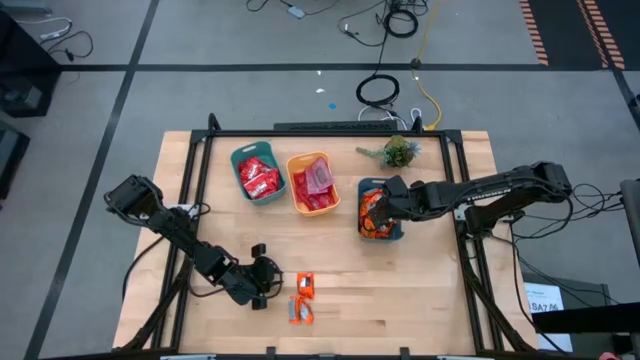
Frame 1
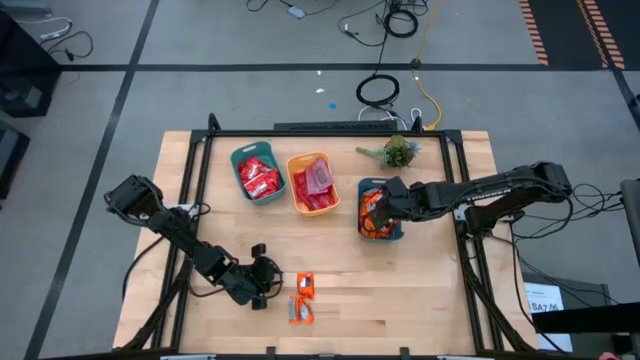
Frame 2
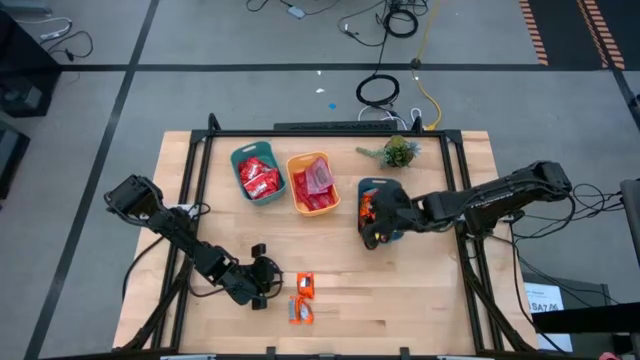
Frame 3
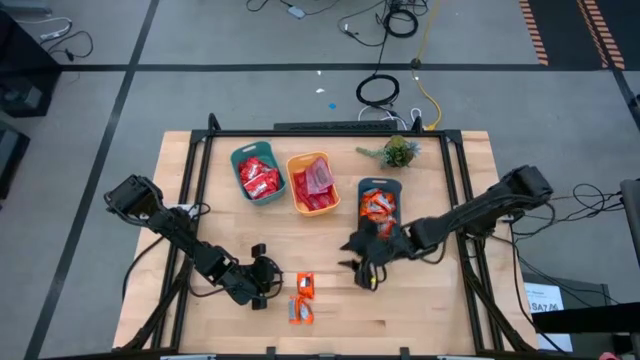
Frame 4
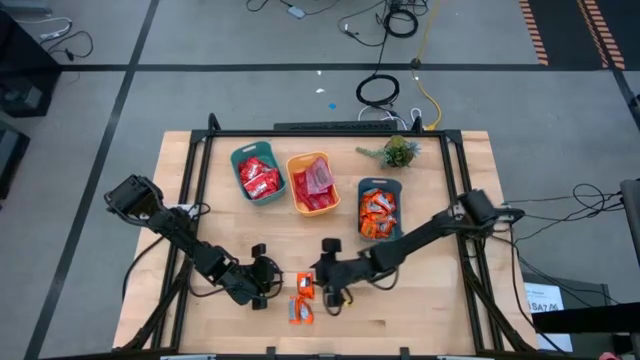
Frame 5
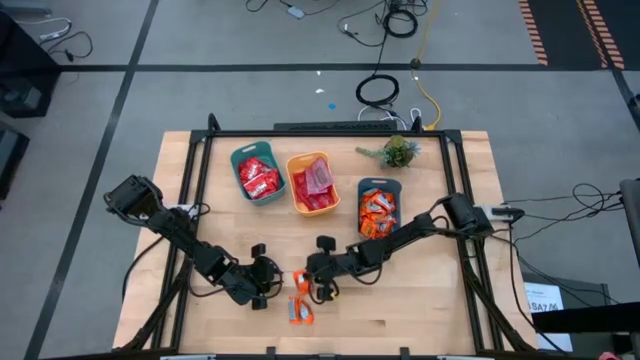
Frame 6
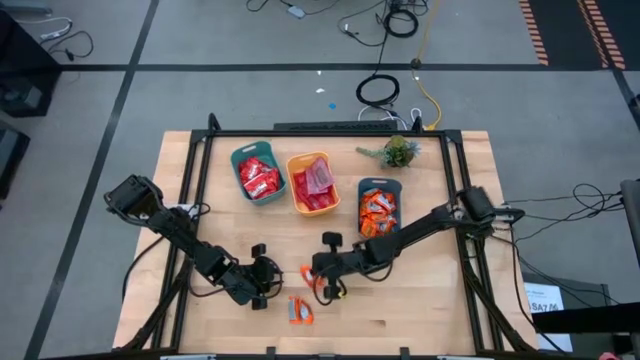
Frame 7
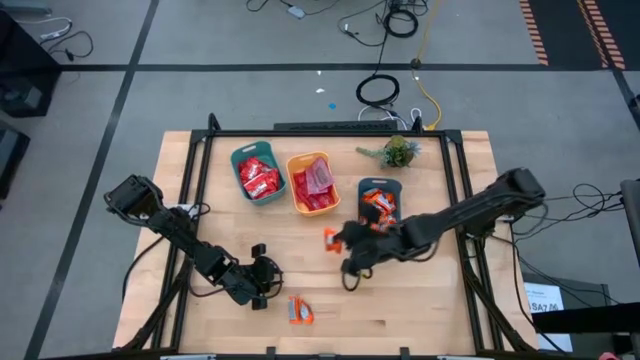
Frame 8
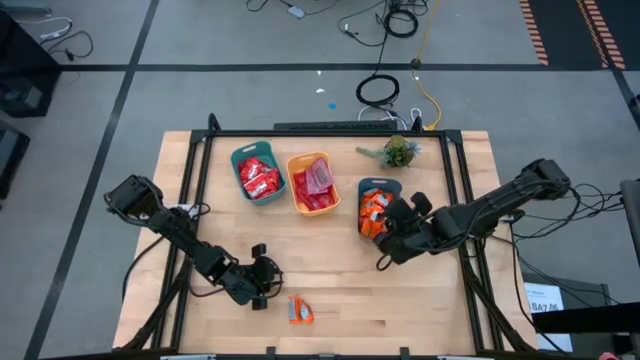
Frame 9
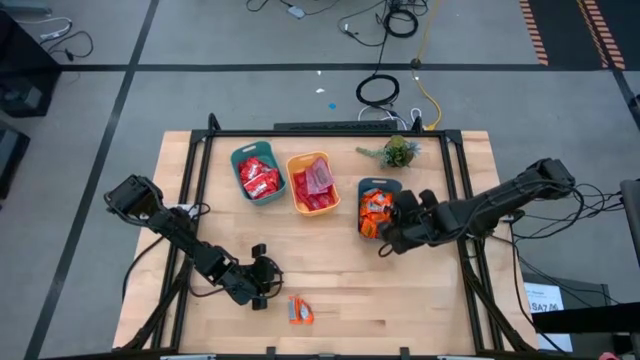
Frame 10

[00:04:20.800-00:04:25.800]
Task: Sort candy
Put the orange wrapper chocolate into the dark blue bin

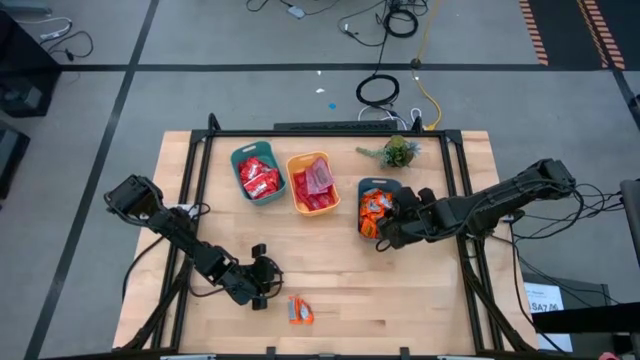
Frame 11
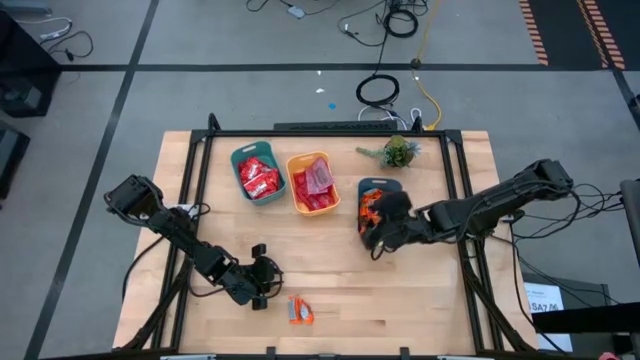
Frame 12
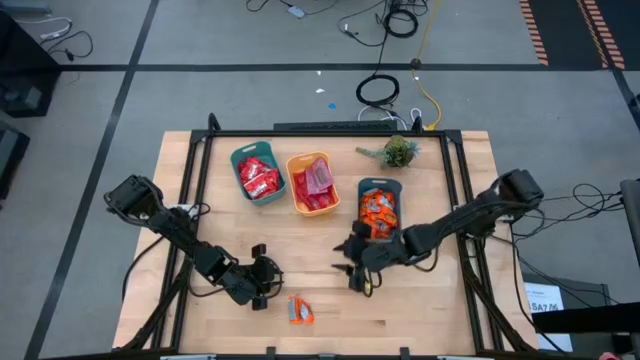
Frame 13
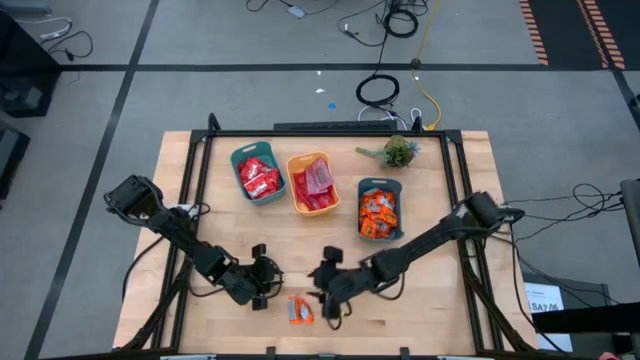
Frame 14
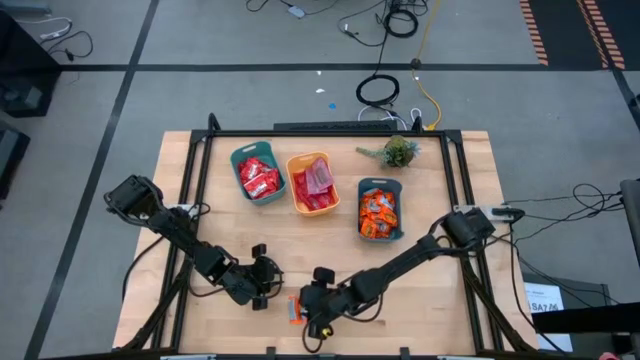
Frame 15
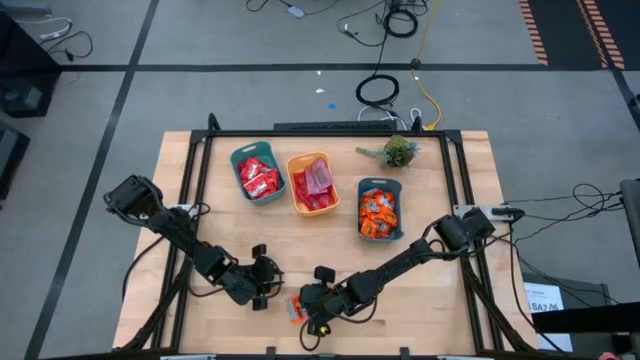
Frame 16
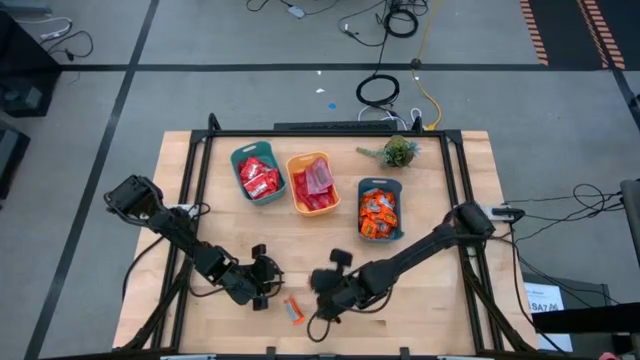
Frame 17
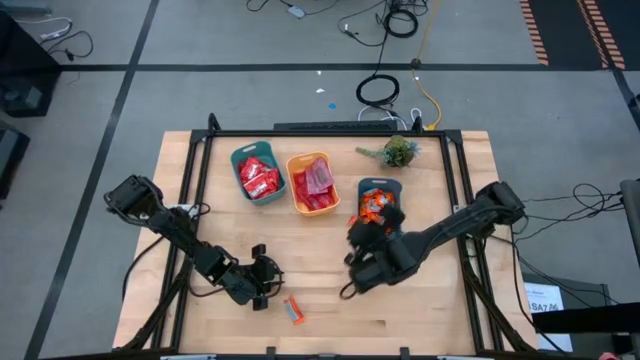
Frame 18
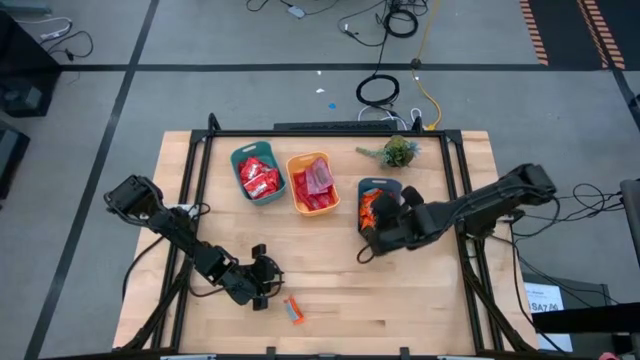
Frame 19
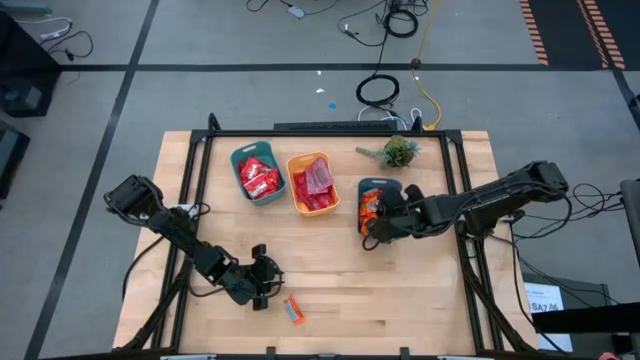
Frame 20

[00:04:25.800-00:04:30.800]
Put the orange wrapper chocolate into the dark blue bin

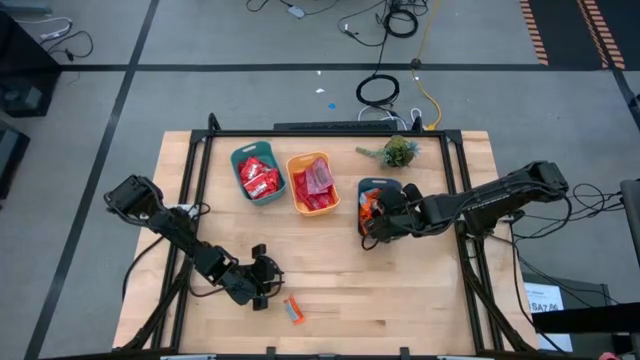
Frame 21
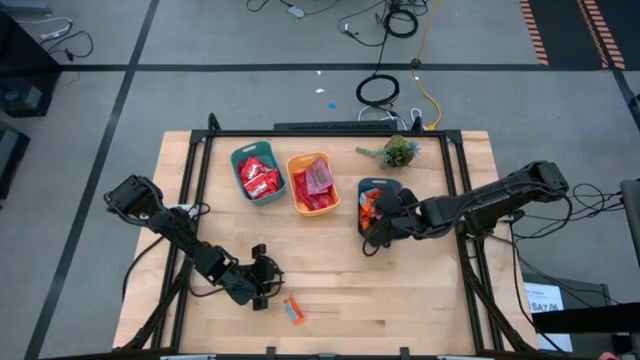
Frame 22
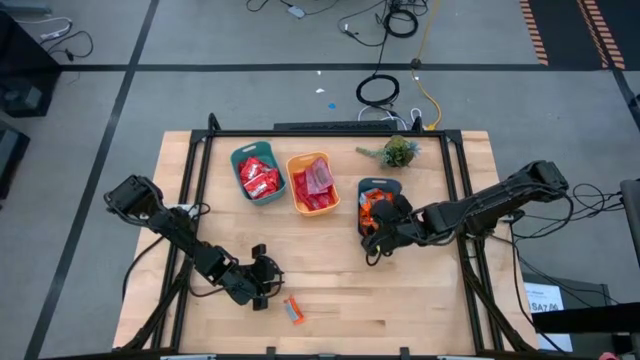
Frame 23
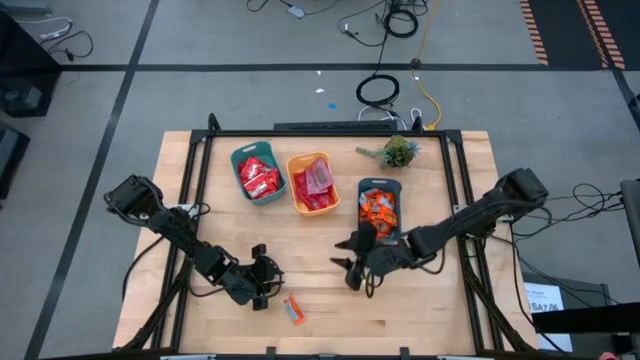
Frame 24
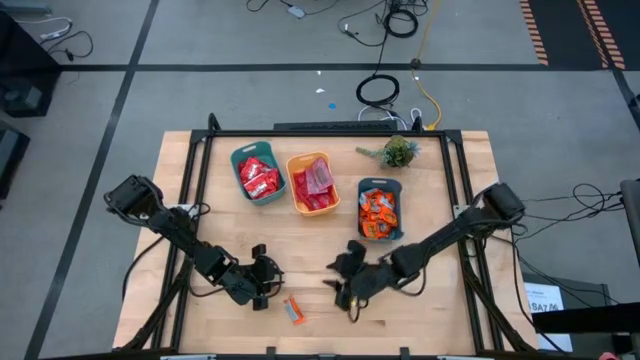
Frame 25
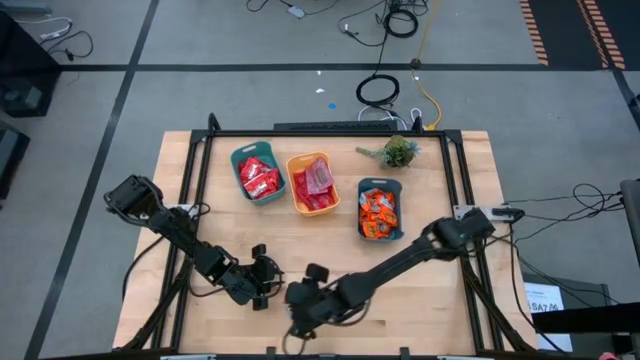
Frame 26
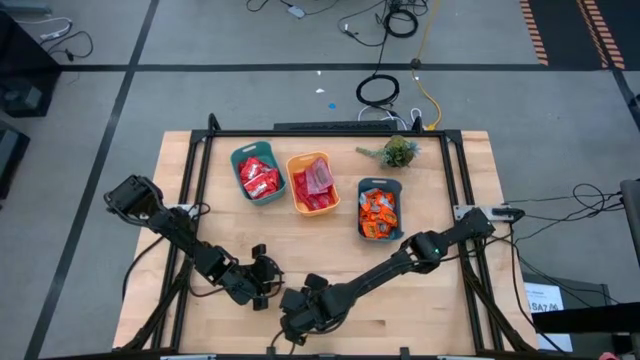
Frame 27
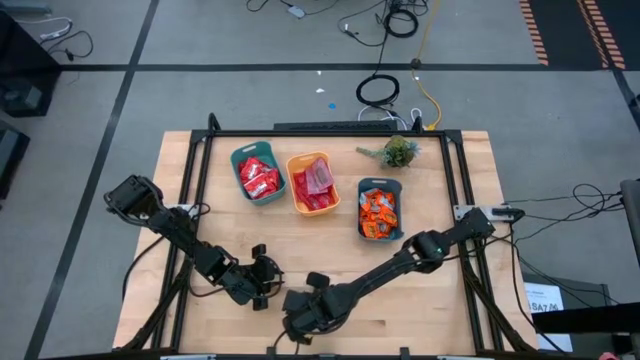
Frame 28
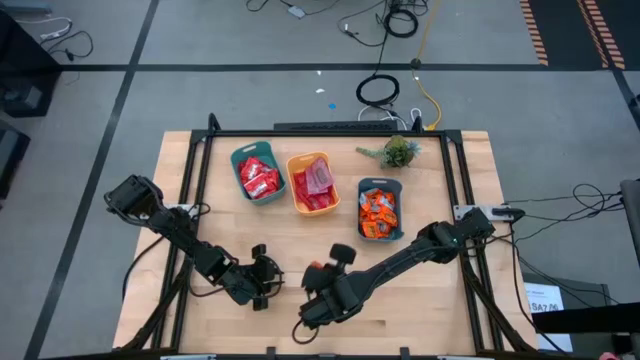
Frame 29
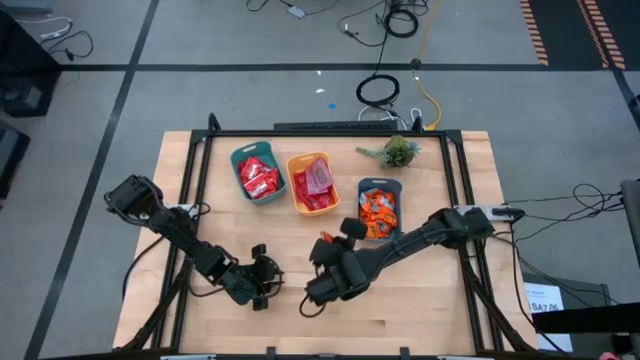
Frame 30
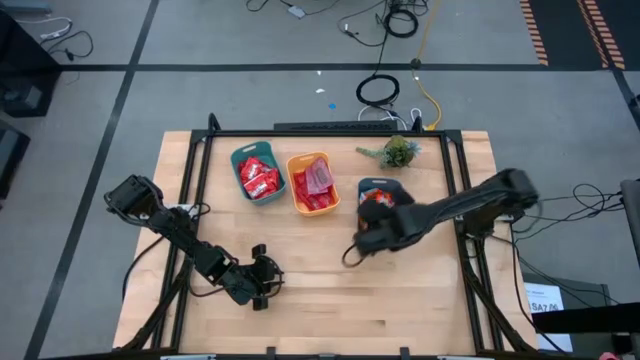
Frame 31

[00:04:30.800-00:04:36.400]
Put the orange wrapper chocolate candy into the dark blue bin

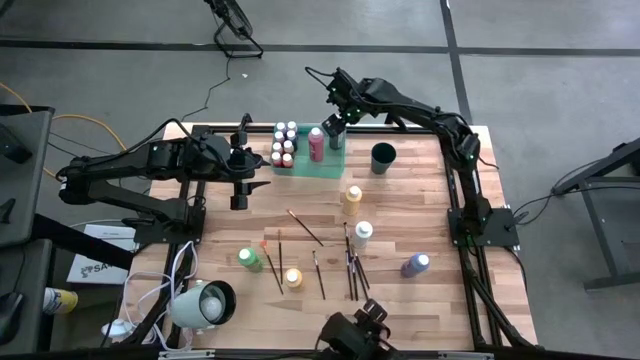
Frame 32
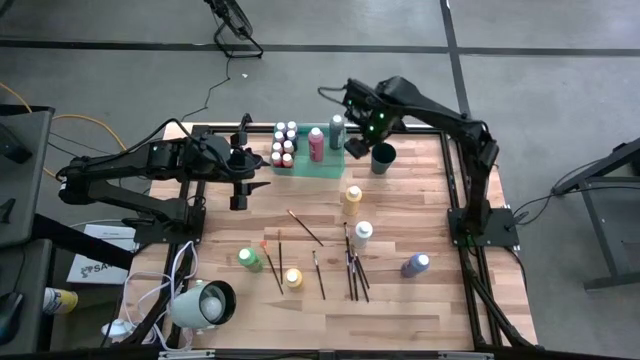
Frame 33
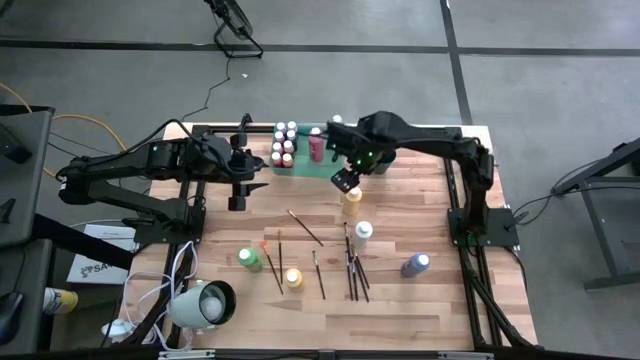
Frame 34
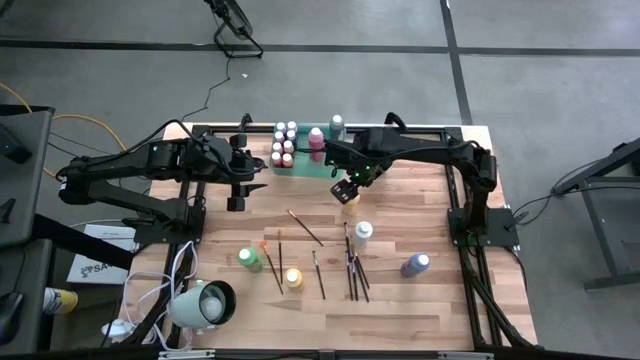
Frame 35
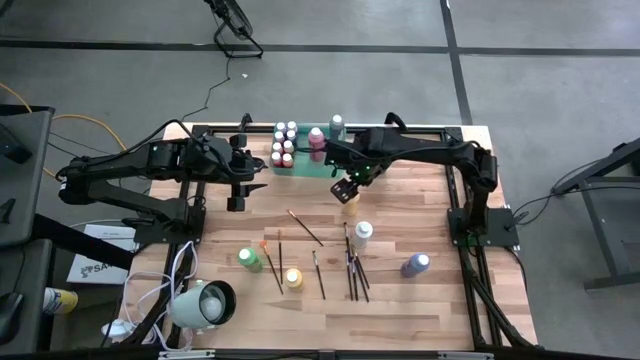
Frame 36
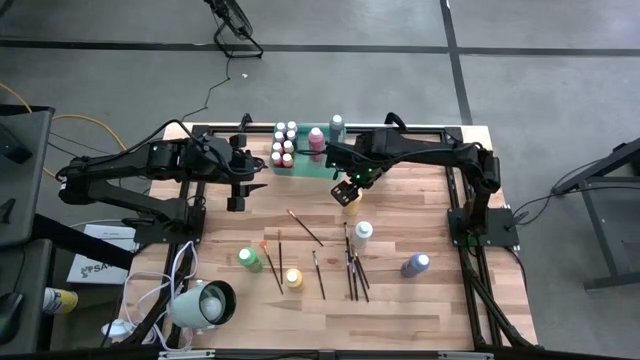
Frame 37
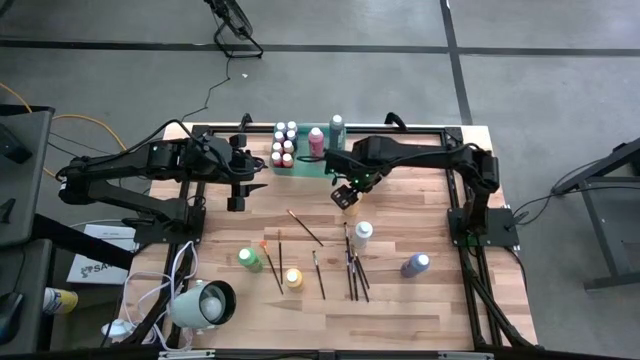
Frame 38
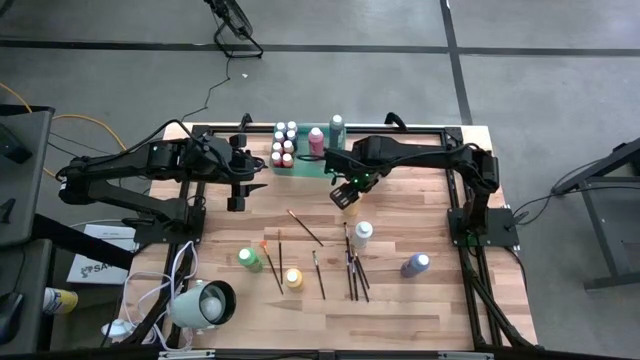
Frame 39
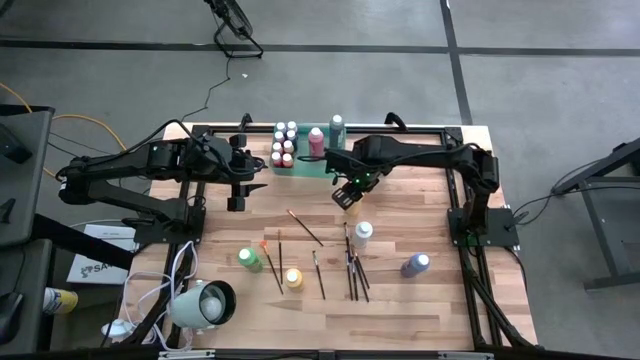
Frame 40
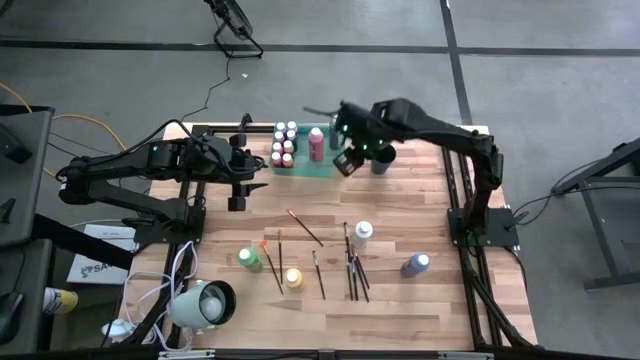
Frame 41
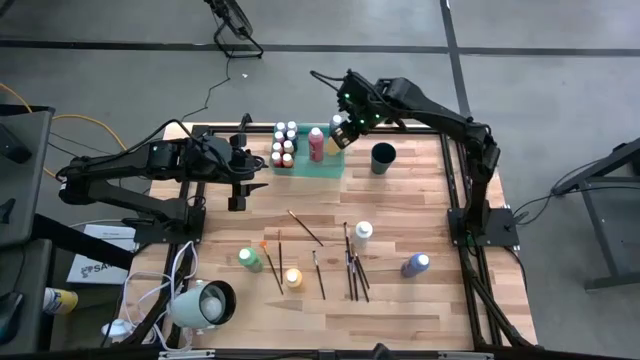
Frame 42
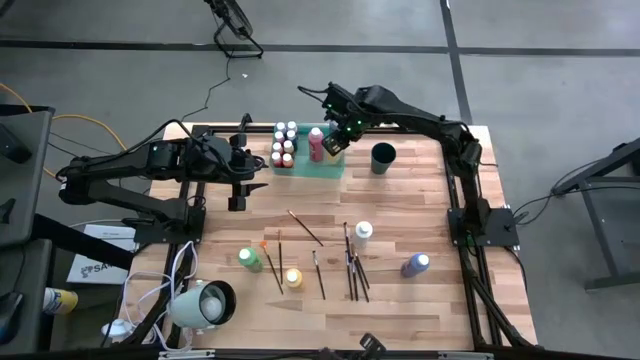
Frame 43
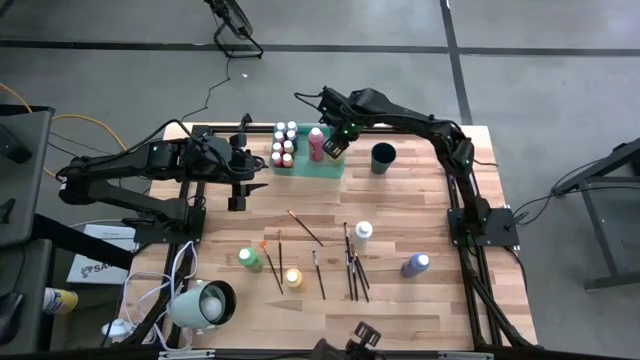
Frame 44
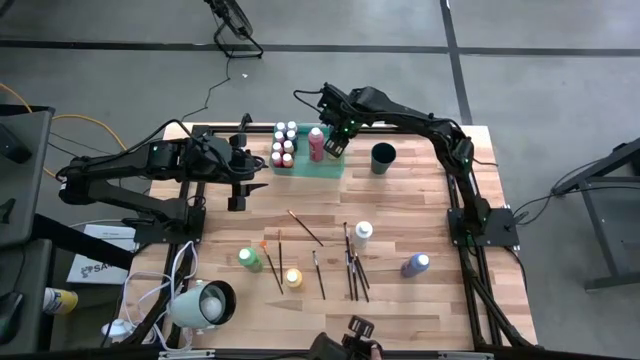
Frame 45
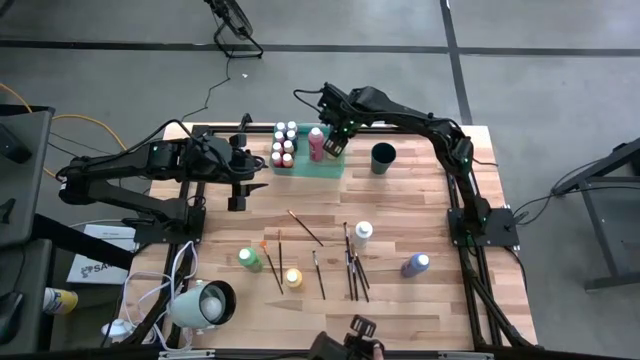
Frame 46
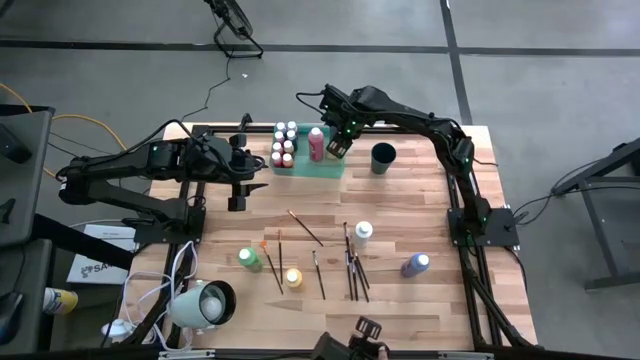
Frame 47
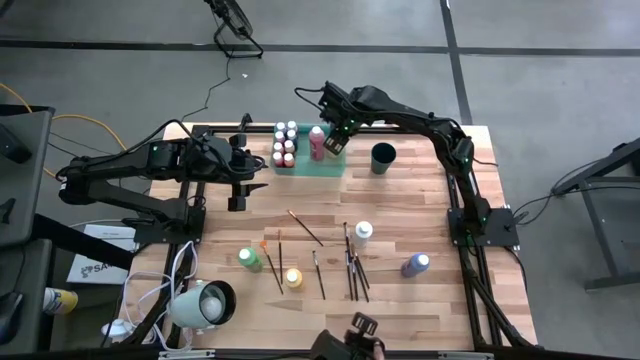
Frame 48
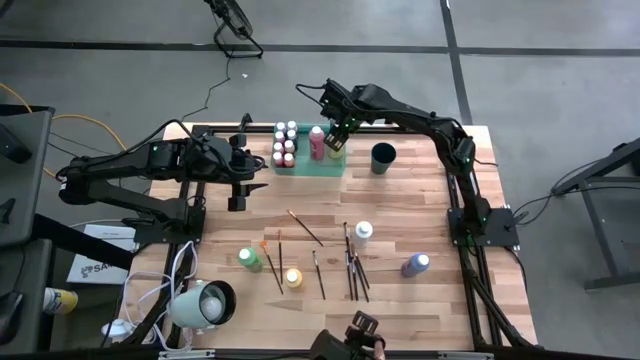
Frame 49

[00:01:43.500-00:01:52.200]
Task: Pick & Place Paint Supplies
Put the large yellow paint bottle into the green bin
